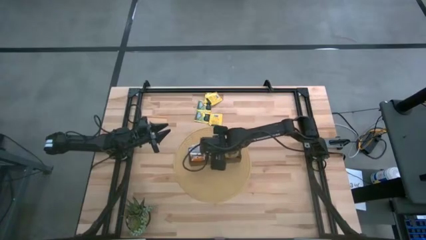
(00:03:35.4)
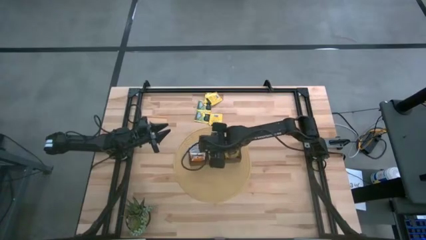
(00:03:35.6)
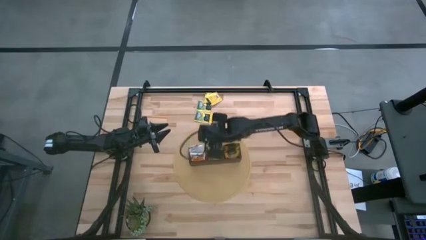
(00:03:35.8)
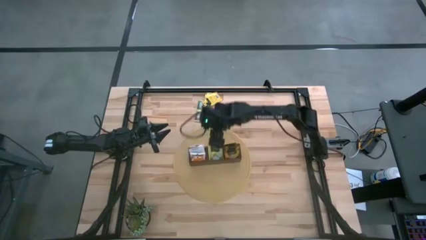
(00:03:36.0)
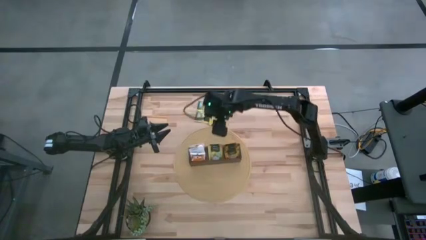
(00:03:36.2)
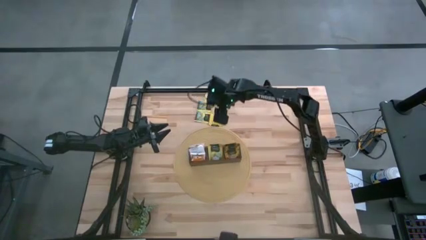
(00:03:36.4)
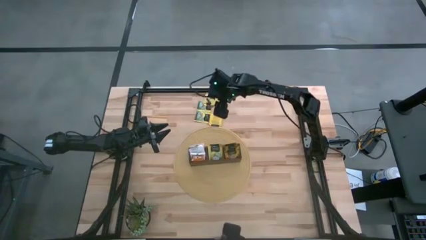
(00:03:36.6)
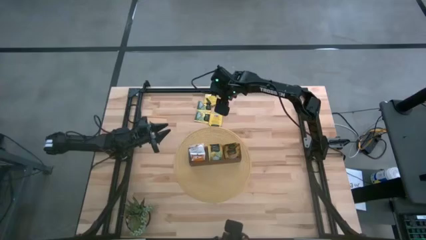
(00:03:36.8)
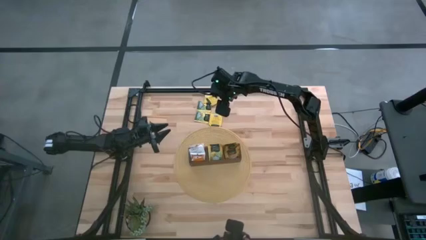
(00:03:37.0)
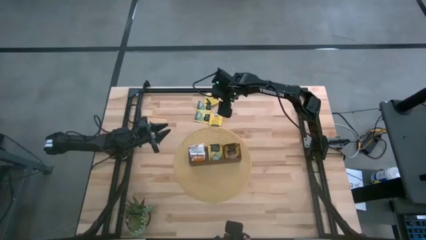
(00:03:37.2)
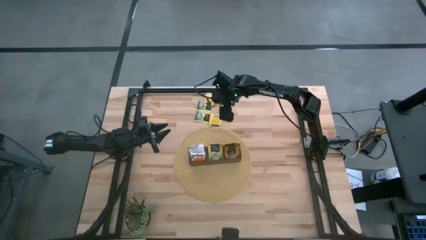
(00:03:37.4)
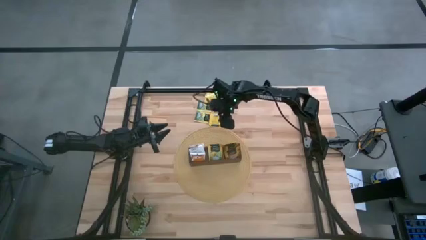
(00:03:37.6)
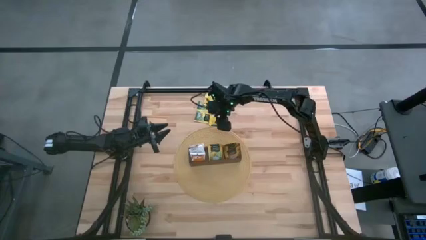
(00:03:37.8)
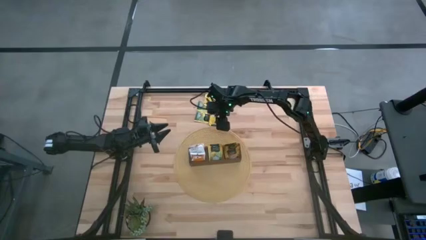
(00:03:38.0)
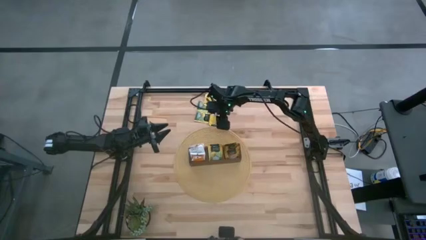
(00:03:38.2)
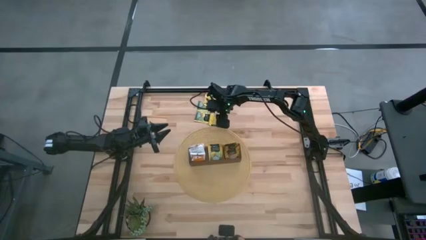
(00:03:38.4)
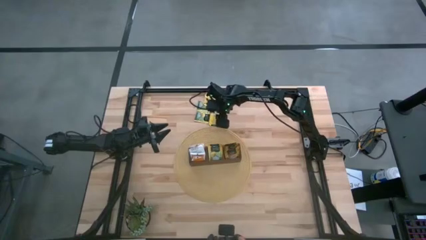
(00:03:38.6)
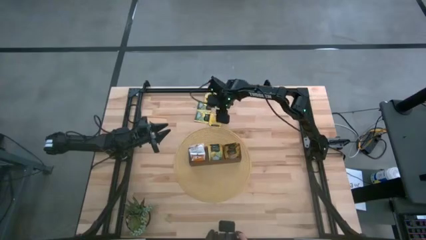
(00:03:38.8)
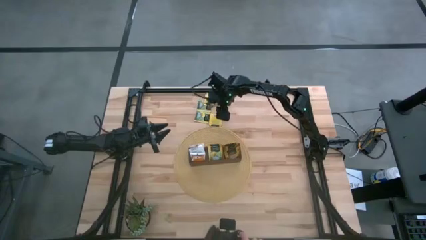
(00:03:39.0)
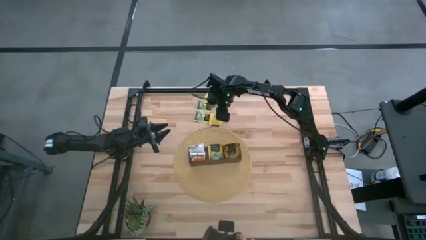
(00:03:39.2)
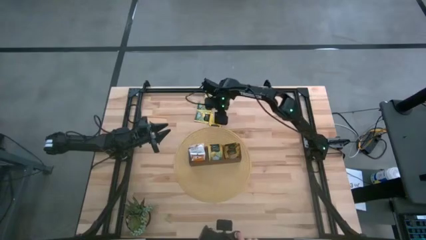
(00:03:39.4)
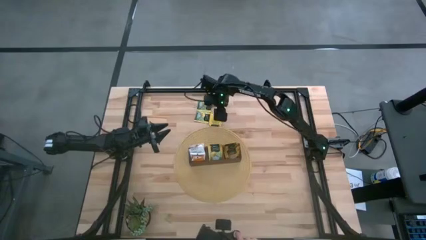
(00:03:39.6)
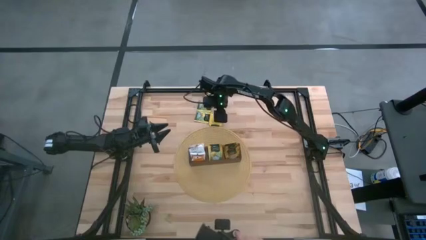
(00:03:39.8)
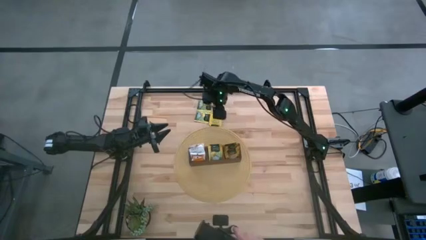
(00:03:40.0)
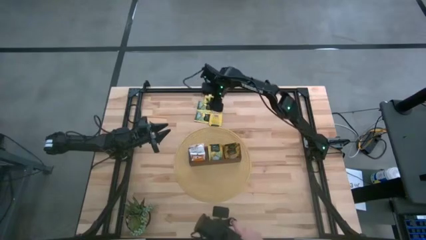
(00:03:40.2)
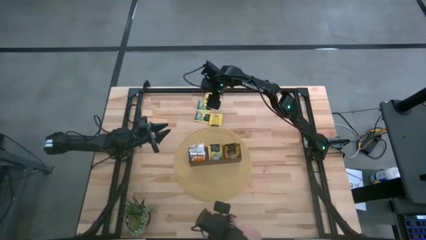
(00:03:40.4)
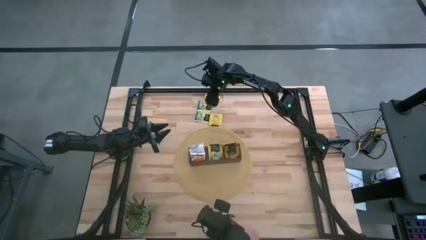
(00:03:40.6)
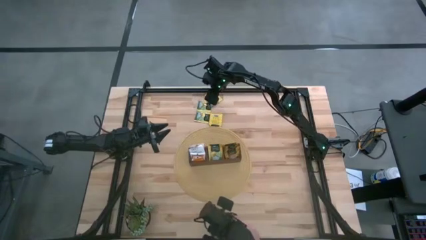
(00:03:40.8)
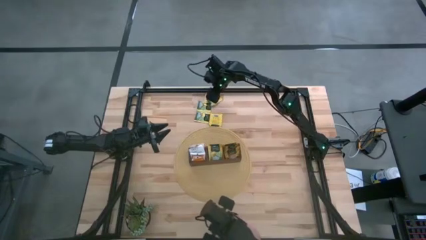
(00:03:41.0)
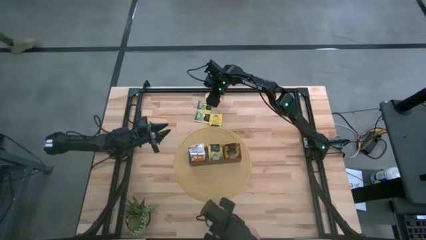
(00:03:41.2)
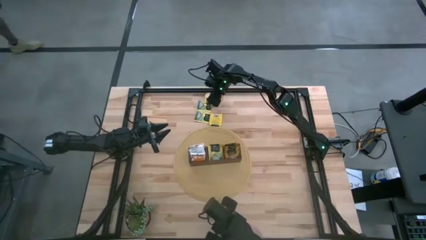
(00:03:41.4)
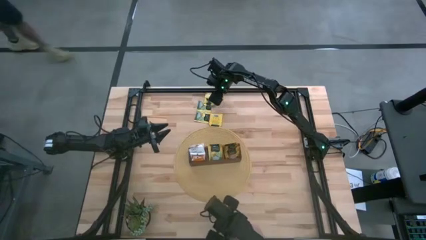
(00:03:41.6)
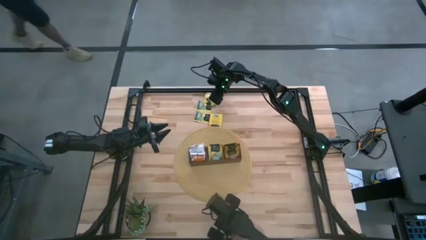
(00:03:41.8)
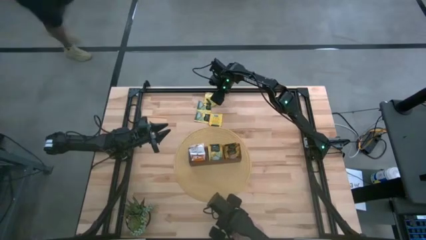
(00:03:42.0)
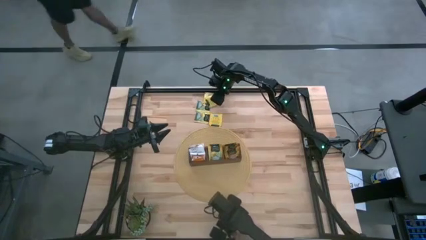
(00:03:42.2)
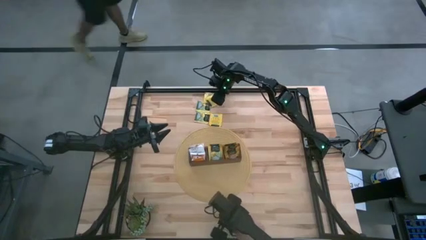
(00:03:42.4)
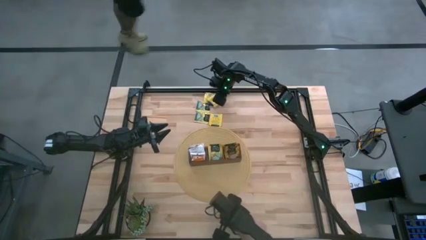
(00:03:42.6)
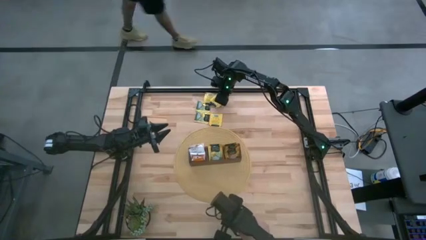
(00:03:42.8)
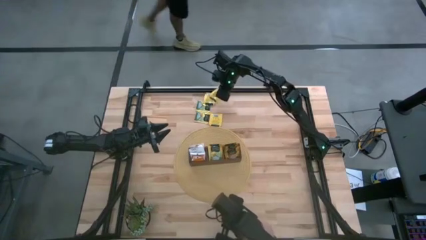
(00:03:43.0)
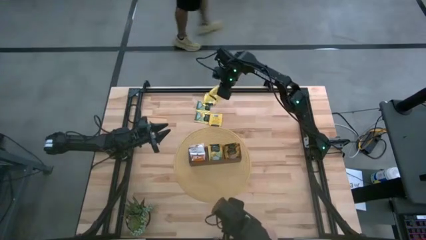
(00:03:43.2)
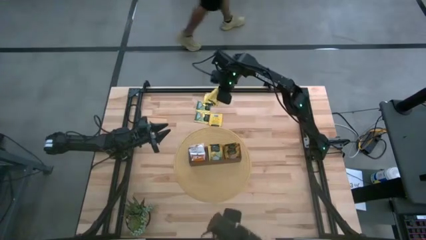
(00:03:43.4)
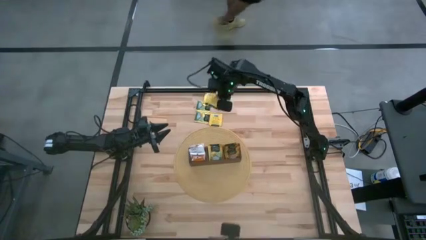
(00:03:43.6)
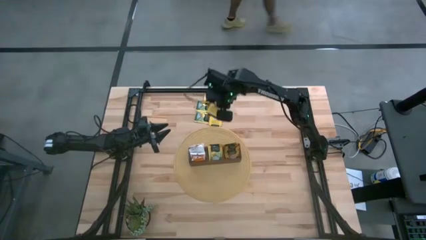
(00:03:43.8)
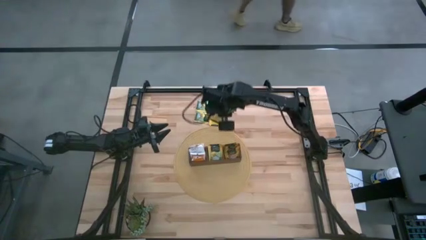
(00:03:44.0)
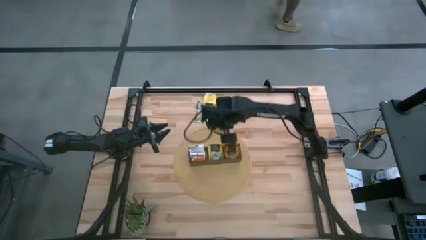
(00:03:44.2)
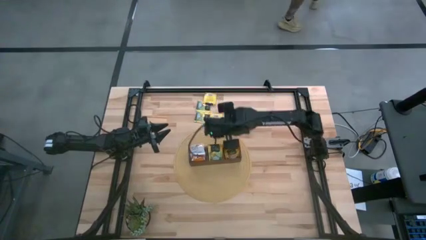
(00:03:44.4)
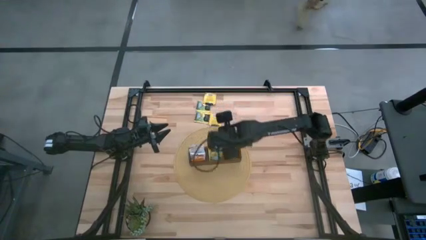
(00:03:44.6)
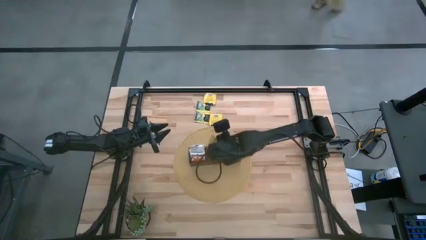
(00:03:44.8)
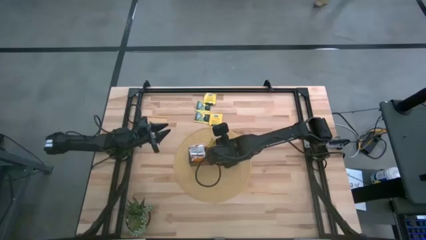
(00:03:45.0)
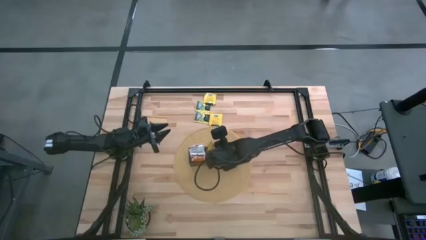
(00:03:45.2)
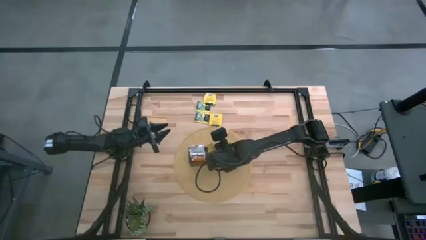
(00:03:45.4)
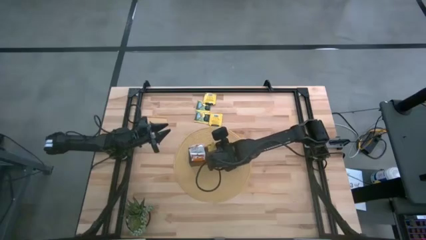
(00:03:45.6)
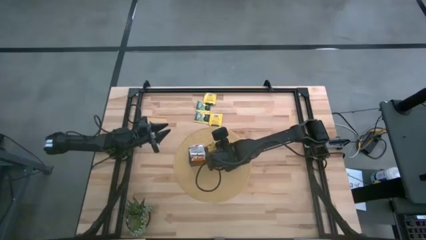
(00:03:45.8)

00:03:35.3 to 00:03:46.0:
Task: Pick & Place Tea
Put the yellow tea bag into the wooden organizer

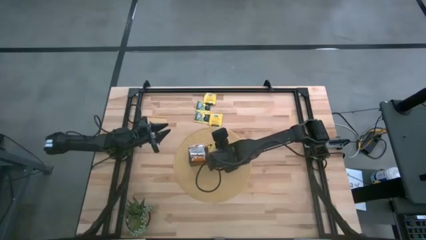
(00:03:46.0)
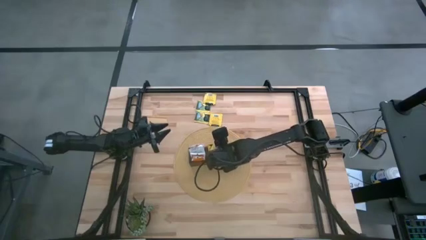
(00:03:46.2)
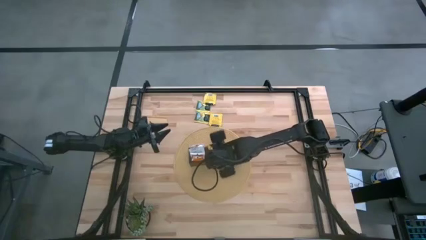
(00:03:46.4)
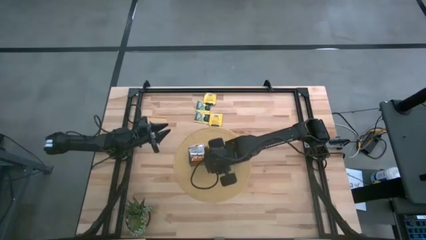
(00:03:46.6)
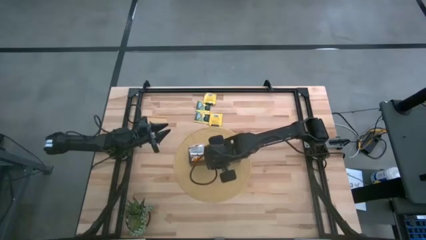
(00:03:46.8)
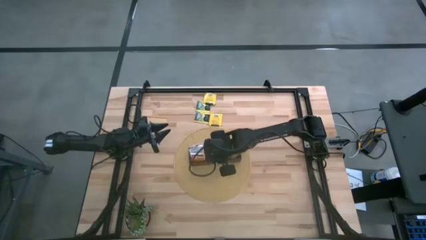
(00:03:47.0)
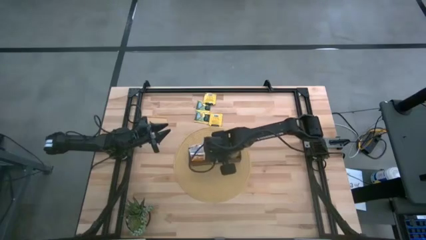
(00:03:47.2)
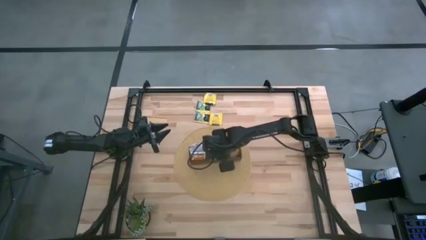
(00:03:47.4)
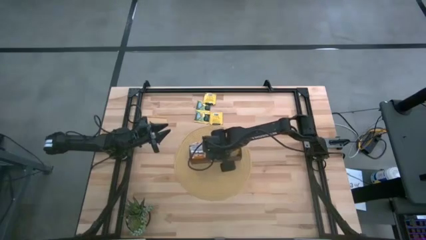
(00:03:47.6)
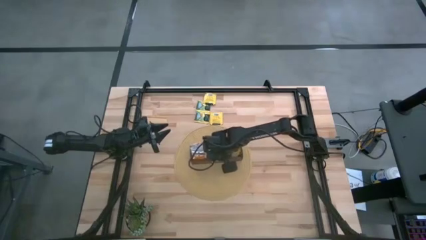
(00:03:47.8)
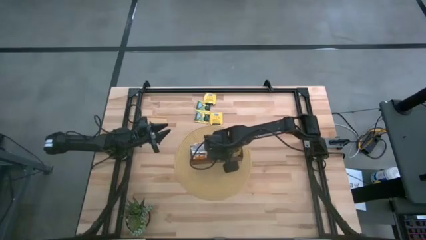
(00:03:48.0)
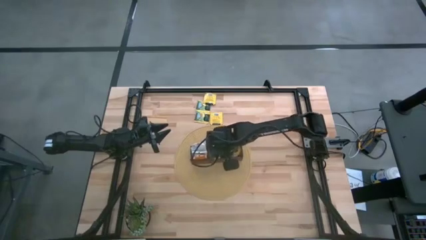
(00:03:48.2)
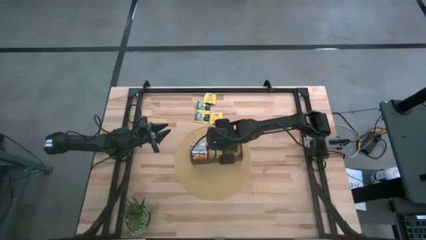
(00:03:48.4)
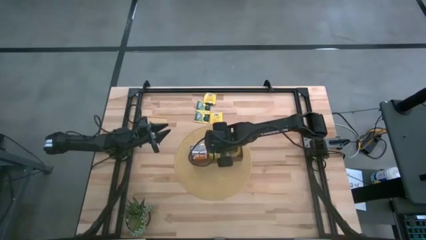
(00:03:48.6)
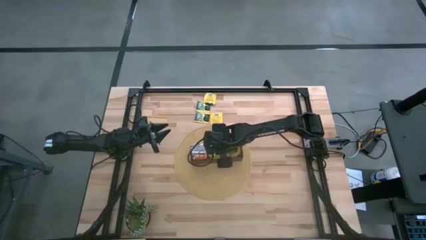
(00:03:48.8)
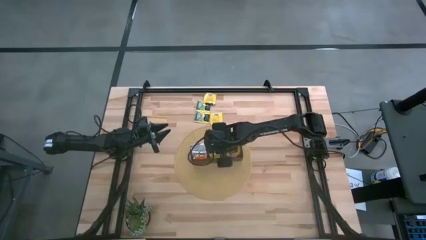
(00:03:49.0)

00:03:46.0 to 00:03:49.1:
Put the yellow tea bag into the wooden organizer

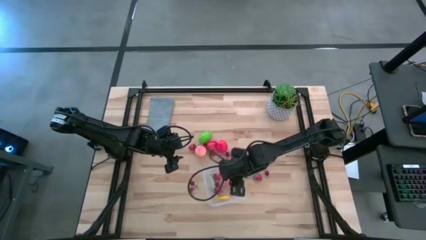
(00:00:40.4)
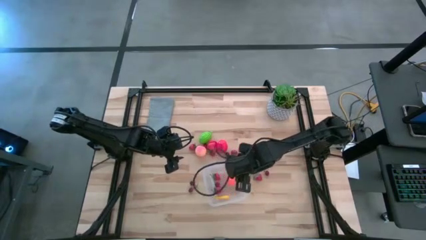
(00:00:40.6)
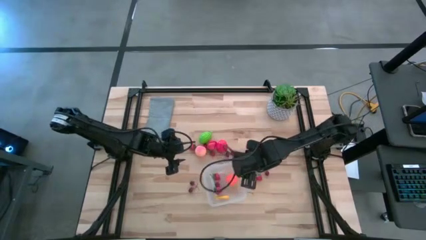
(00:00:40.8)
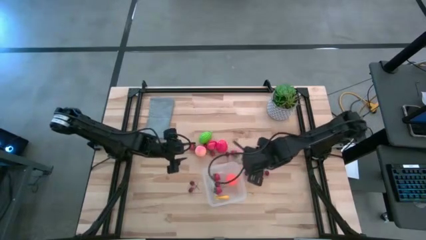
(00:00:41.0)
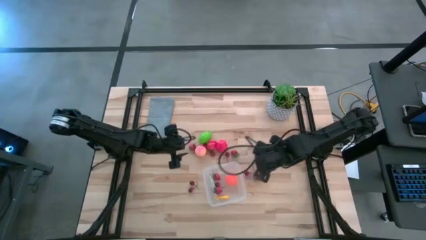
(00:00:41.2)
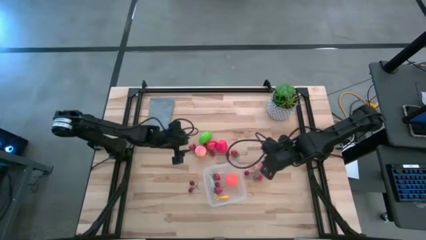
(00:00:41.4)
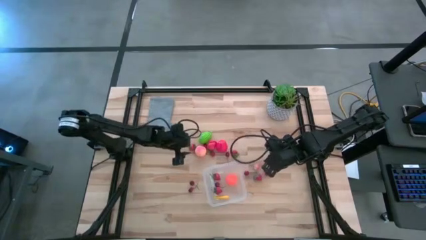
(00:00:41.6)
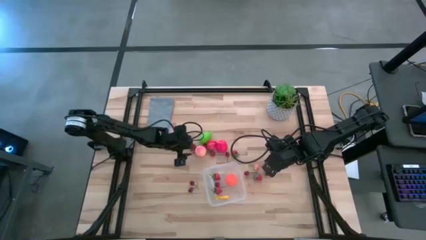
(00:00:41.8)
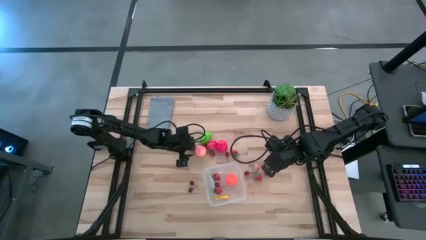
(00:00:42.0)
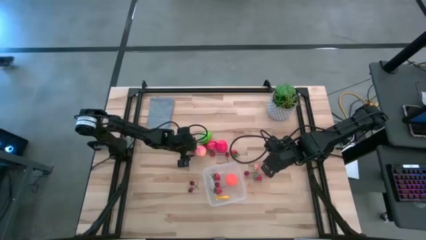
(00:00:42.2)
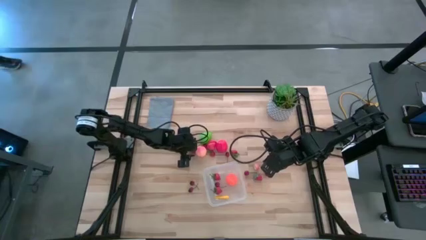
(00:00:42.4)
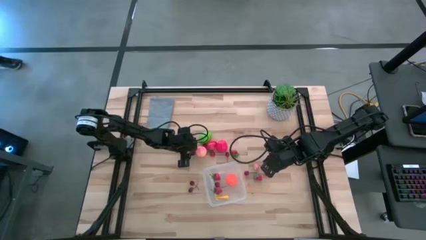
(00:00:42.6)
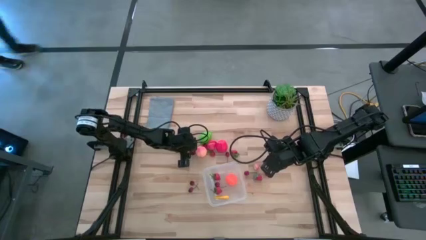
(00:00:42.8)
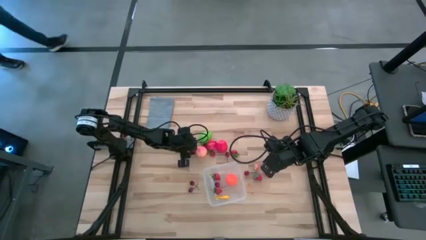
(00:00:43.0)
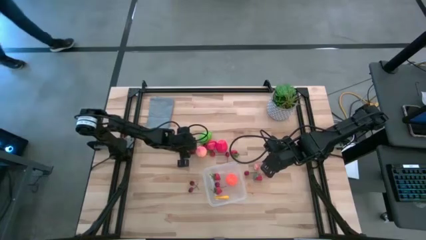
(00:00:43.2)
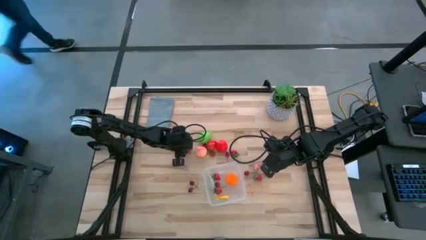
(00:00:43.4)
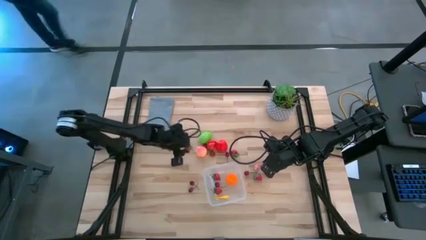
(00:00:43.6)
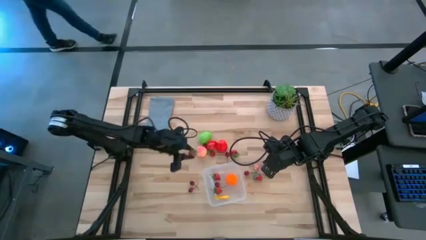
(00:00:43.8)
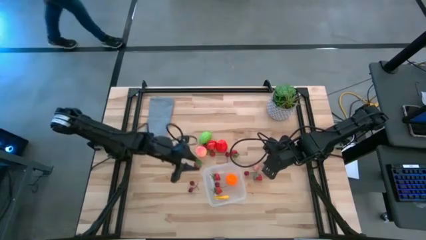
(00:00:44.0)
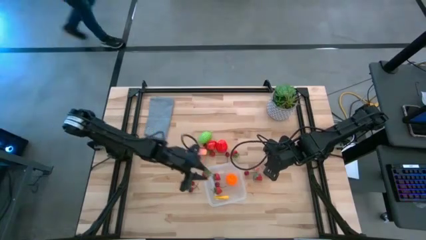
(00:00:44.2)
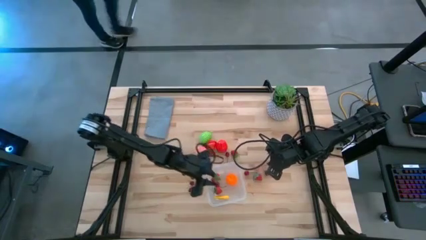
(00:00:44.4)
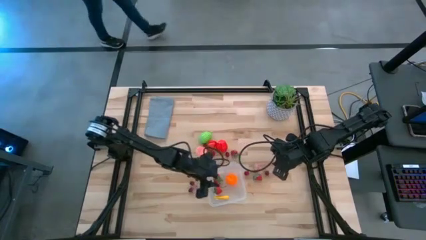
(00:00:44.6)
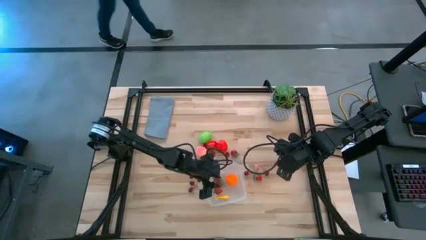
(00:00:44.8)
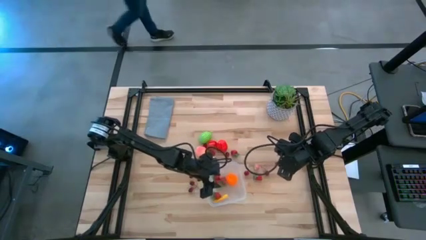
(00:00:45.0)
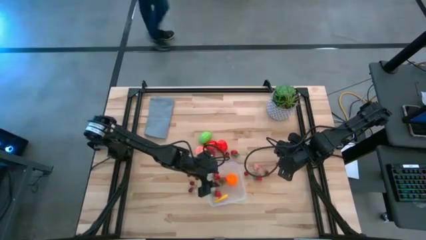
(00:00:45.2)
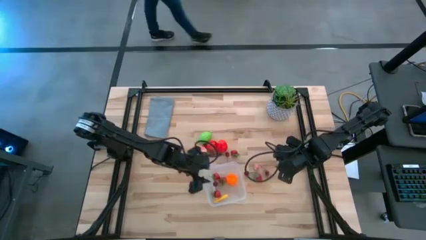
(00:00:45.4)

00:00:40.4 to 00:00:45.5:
Task: Pick and placing Produce into tupperware
Put the red strawberry into the transparent bin
